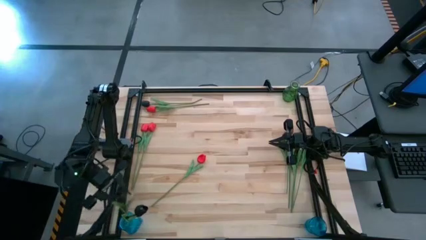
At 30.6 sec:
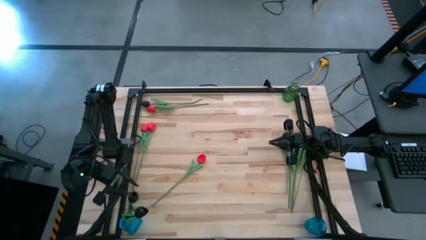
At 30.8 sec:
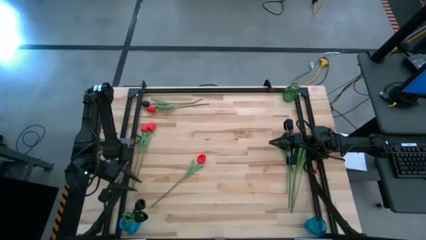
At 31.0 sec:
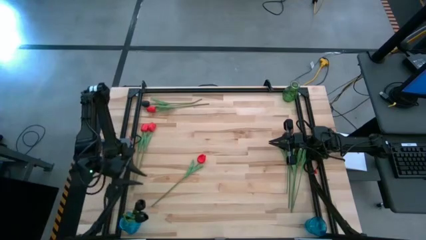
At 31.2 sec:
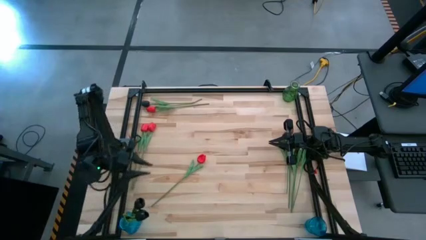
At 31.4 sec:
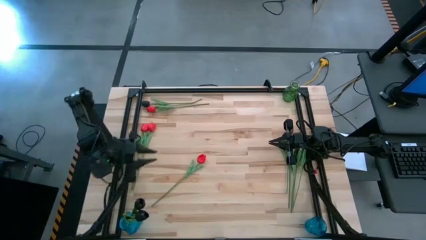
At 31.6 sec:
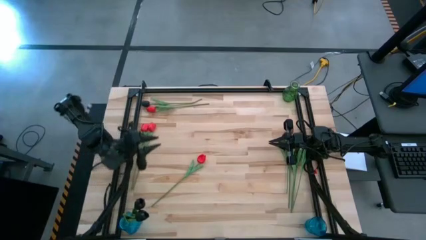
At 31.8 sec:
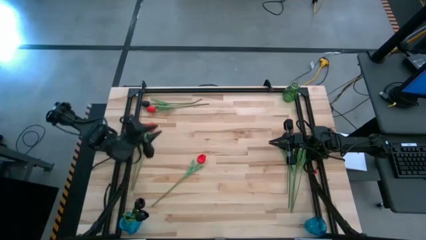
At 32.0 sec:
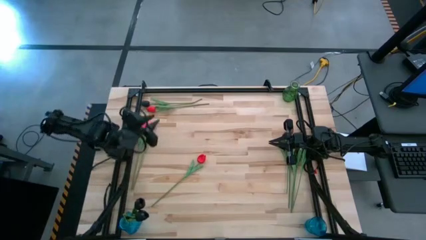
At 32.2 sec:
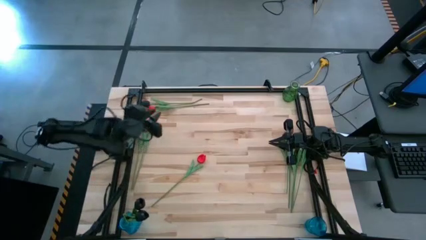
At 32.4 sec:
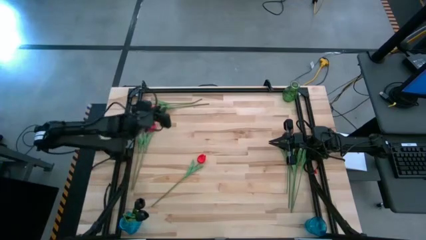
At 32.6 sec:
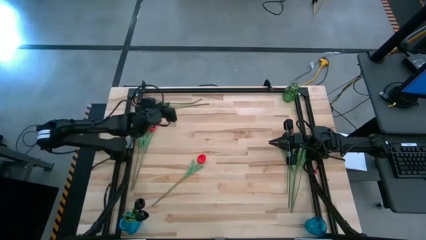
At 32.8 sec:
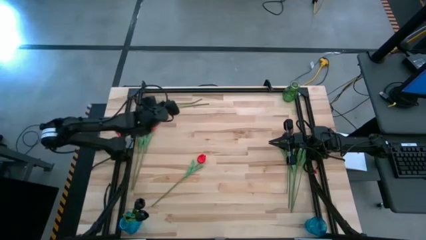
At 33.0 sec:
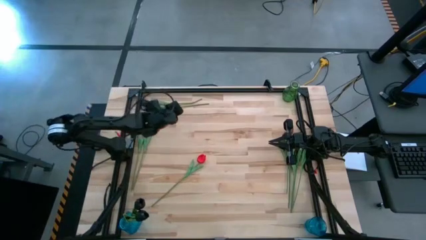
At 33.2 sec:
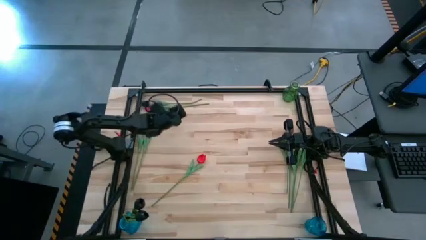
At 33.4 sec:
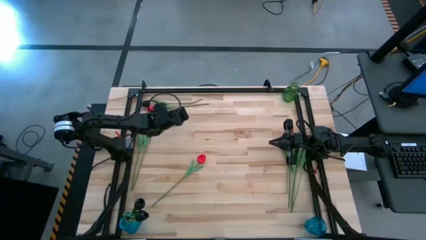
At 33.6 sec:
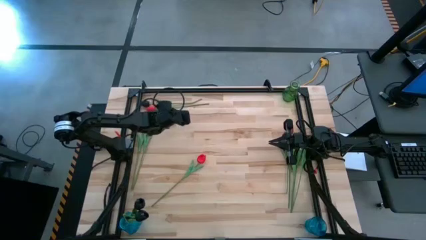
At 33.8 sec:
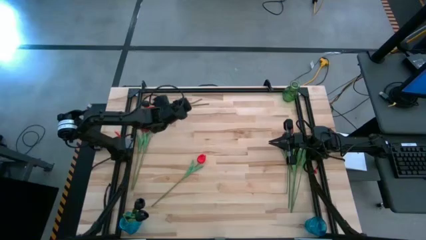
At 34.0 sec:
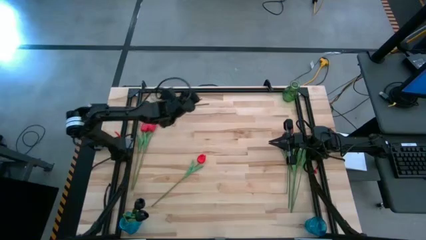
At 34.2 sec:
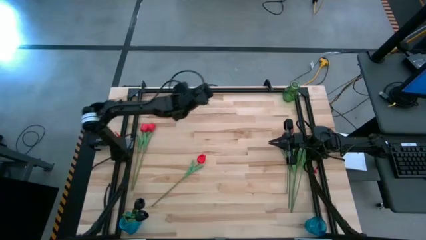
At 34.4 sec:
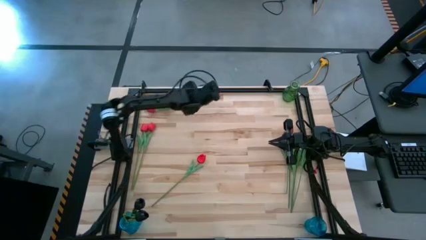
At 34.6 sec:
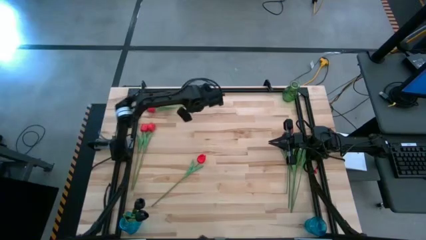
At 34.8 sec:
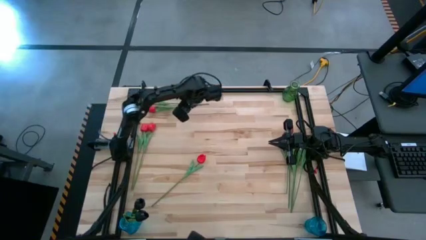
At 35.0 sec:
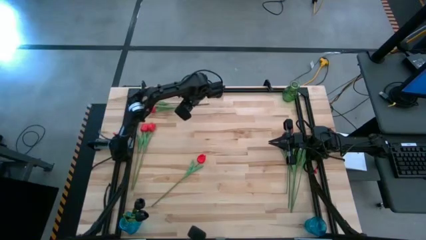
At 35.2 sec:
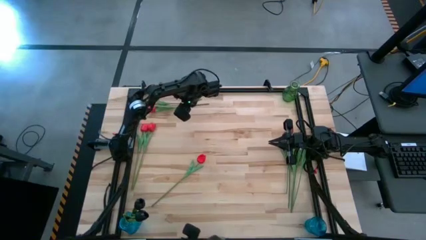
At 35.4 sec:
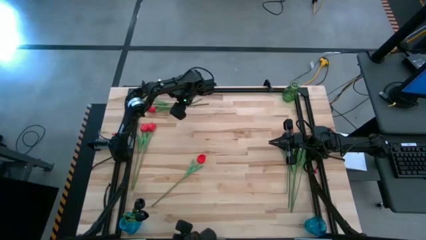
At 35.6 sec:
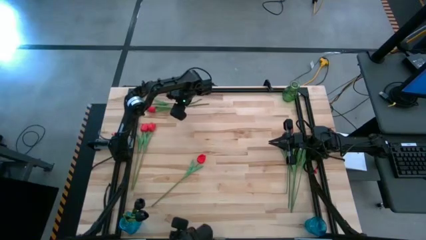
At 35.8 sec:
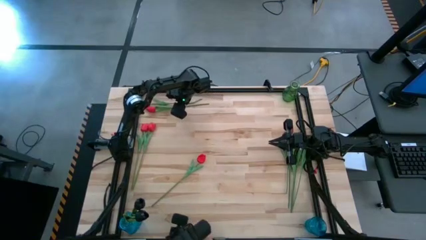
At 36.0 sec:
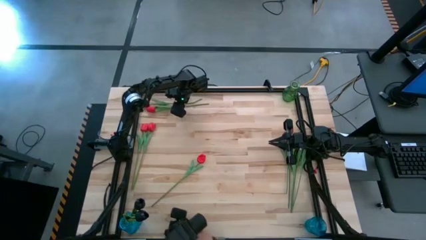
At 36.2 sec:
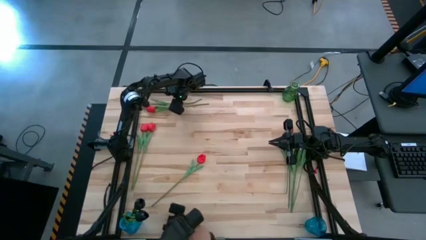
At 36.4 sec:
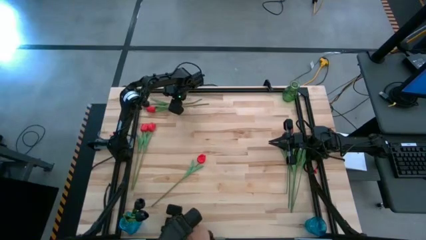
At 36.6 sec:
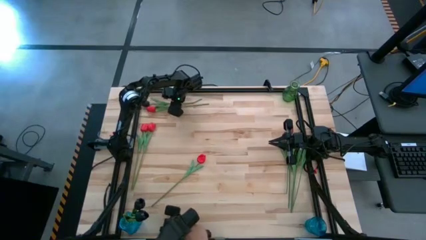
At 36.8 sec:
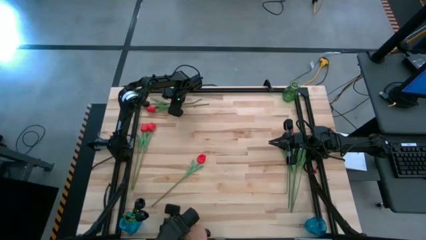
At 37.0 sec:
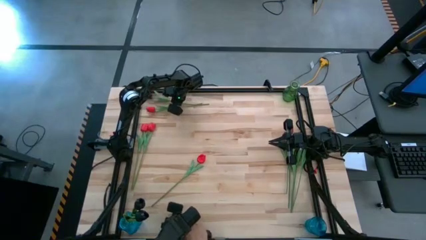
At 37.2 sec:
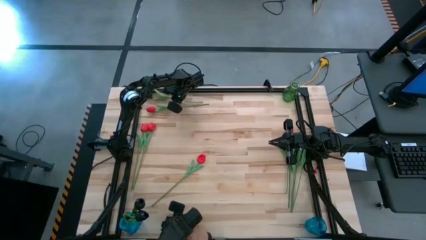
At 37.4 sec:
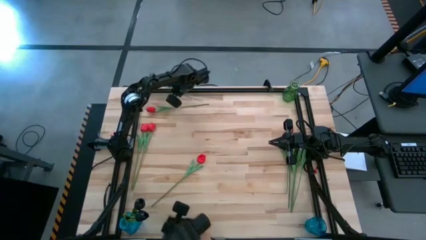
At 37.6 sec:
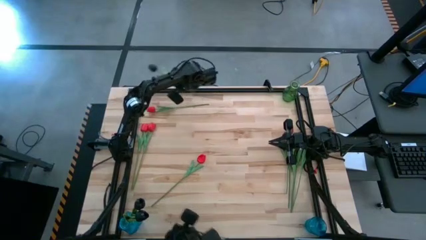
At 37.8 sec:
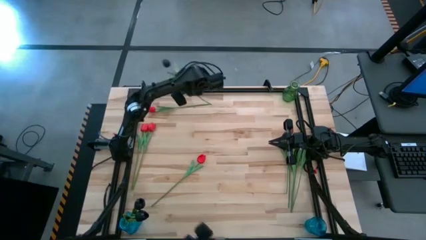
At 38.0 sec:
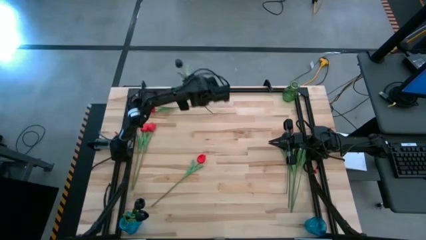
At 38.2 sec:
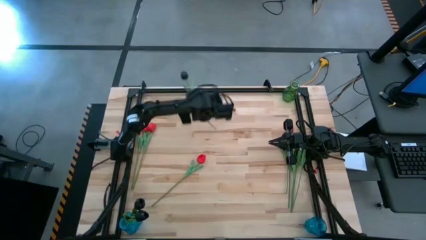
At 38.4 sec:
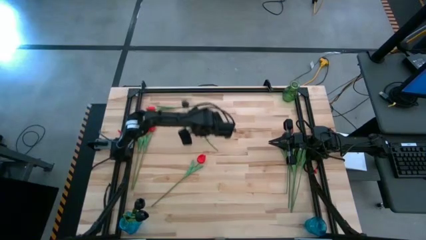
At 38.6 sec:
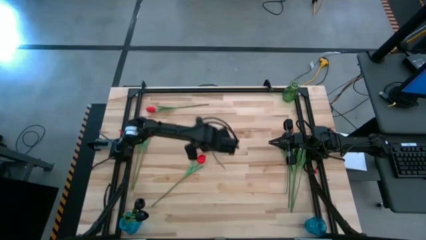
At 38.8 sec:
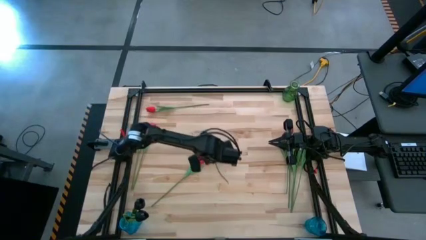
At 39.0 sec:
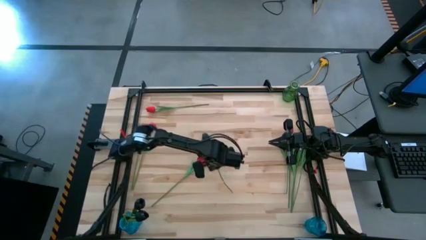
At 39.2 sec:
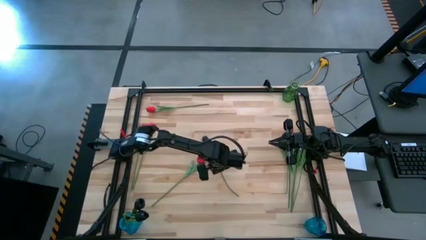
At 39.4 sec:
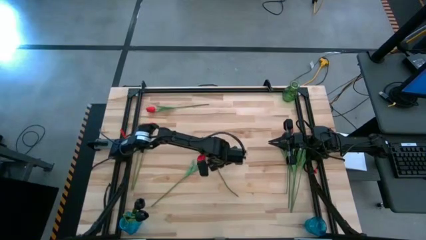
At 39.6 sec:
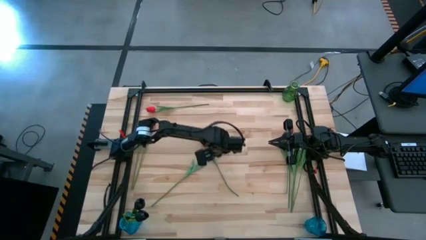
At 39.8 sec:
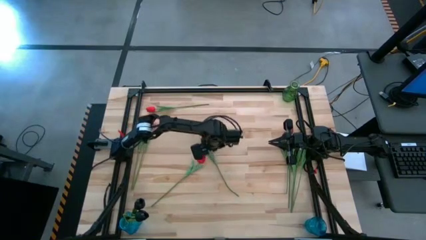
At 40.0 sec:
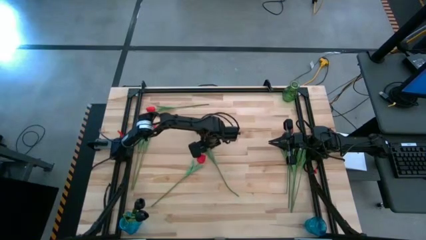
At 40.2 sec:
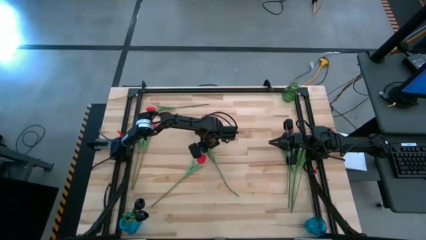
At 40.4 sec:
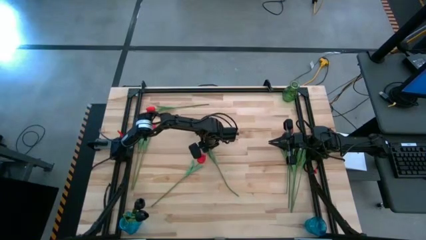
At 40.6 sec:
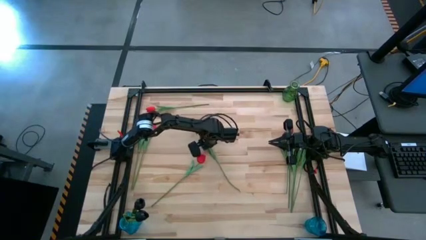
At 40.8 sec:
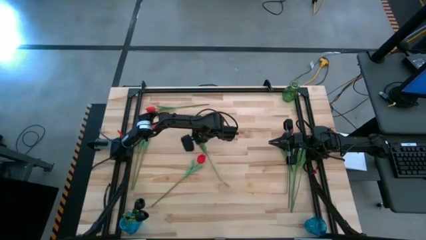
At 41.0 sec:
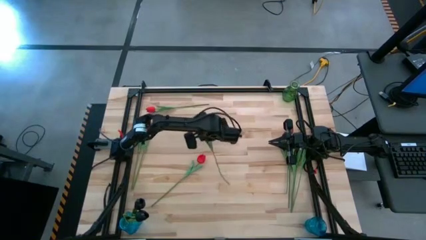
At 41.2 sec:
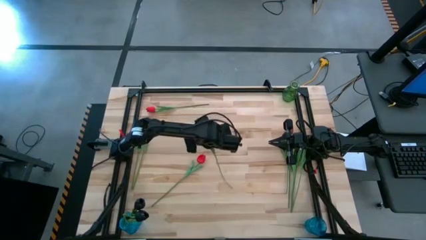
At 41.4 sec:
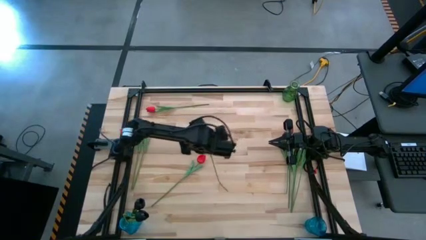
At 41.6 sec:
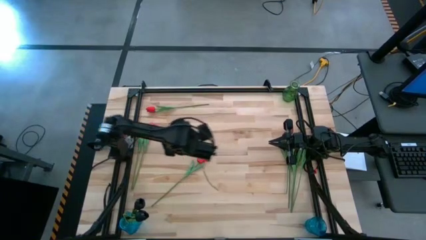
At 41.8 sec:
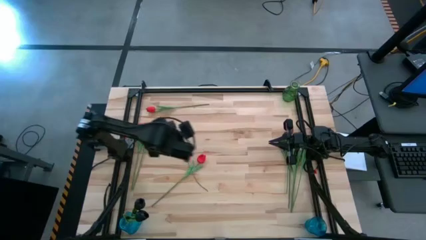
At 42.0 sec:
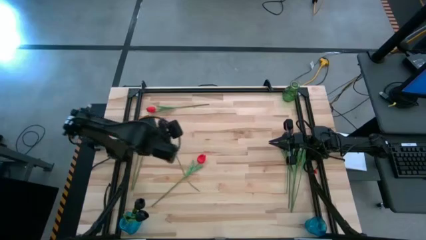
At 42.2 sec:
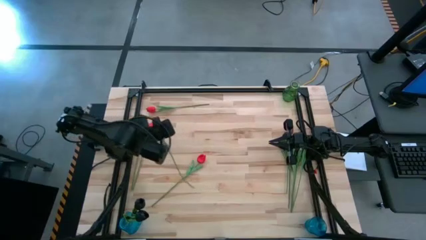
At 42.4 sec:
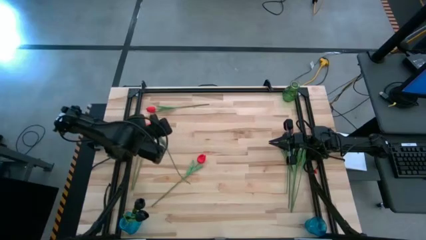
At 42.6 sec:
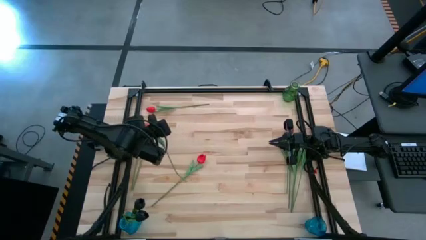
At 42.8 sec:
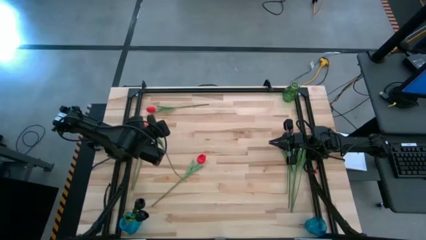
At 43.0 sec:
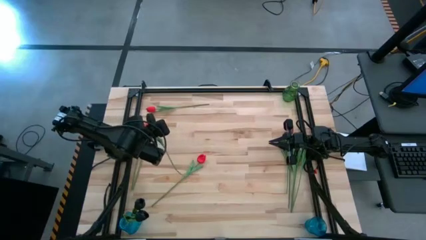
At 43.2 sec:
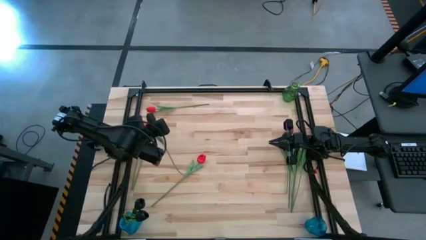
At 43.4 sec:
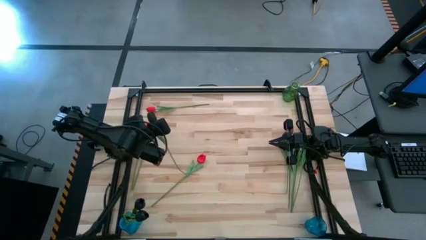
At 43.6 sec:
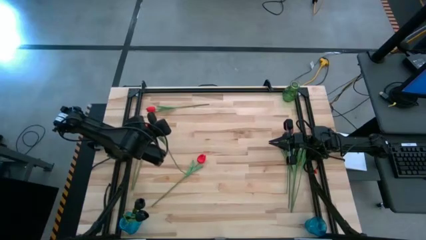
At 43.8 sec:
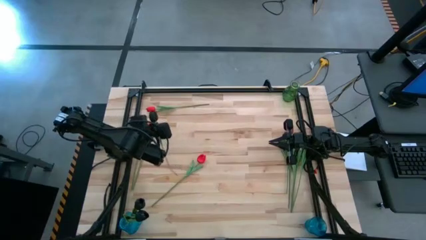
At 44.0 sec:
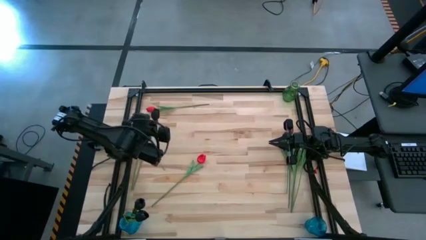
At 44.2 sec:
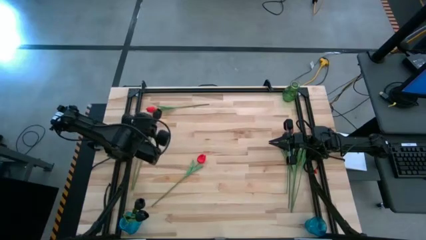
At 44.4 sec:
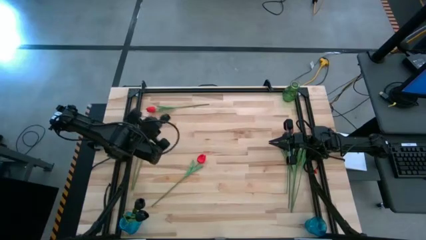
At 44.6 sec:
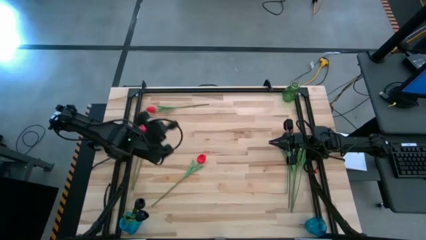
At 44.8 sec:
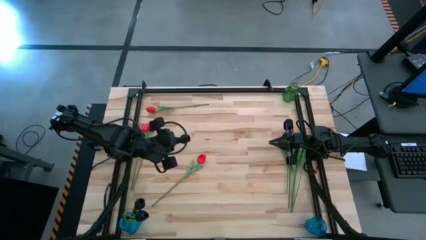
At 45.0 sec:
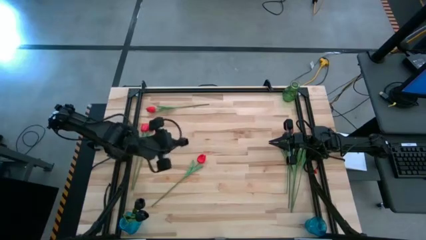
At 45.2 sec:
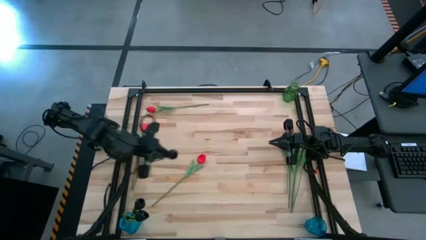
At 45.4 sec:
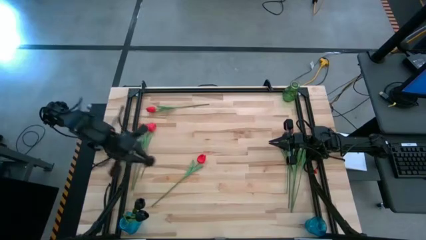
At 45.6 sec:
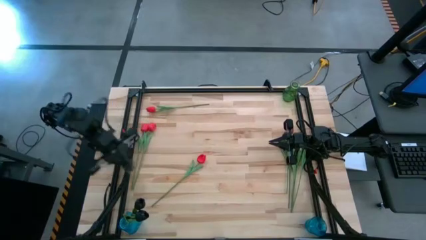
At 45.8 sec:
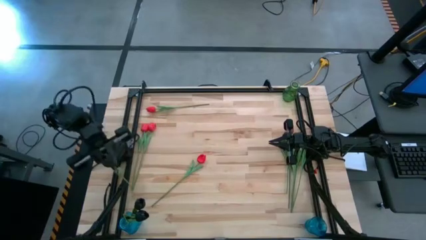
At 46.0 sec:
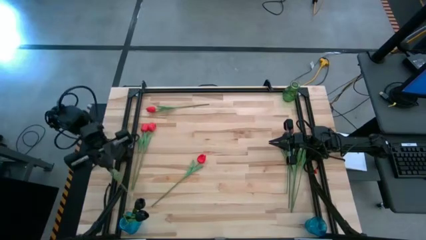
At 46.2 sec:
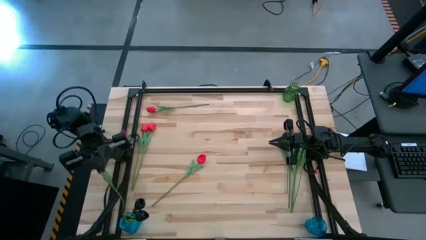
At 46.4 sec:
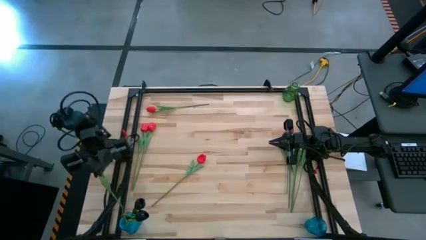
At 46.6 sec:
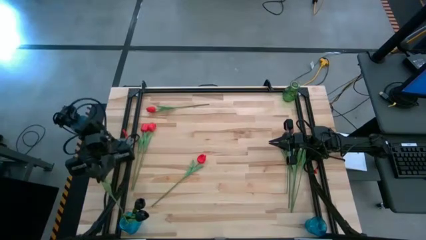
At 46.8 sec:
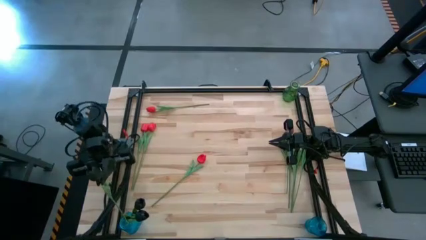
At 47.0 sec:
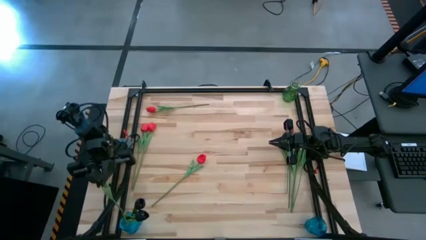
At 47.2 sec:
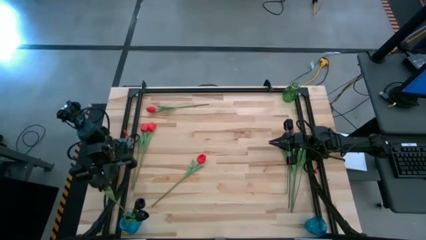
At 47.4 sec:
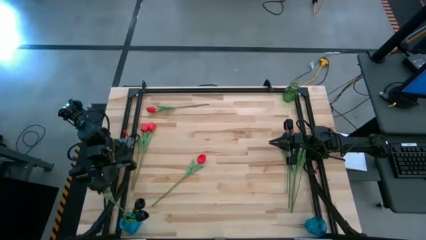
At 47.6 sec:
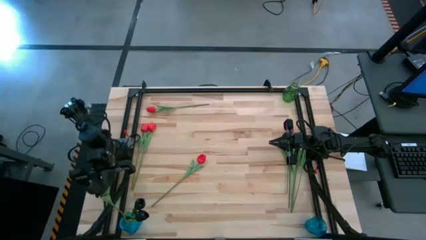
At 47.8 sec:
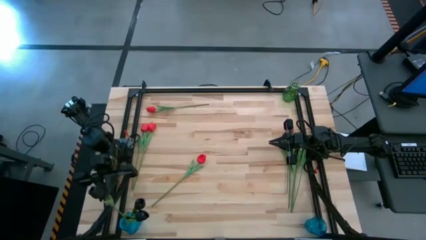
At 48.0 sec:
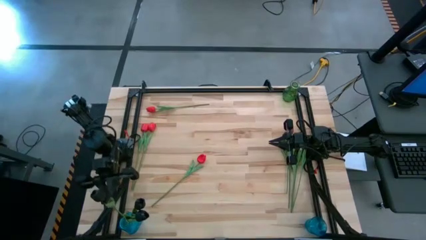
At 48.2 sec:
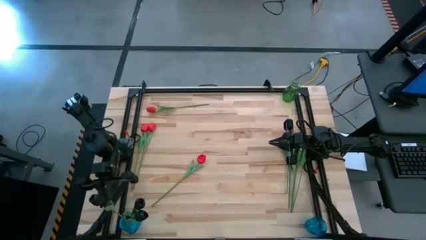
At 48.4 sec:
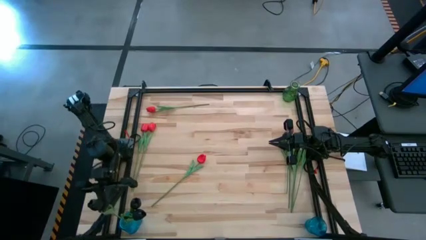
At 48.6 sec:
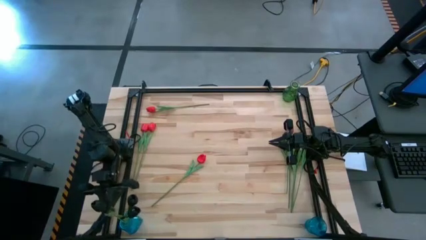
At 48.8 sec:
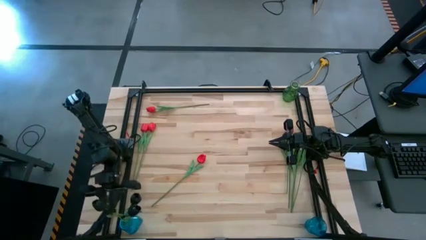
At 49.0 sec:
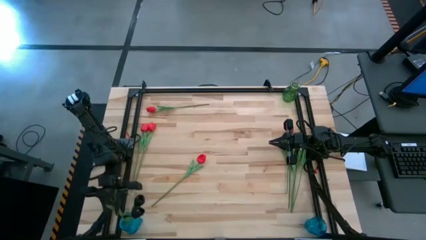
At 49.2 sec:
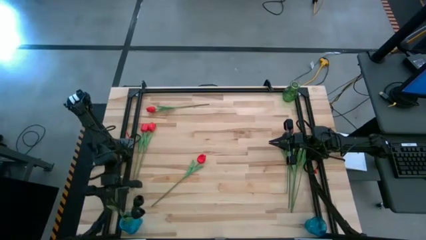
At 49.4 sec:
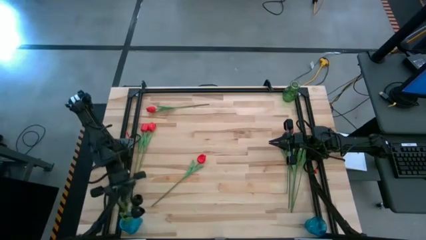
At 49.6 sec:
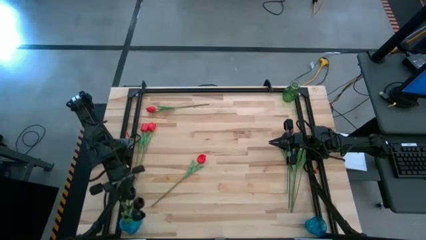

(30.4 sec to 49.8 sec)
Task: Sort flowers into vase by color
Put the black tulip into the left blue vase
